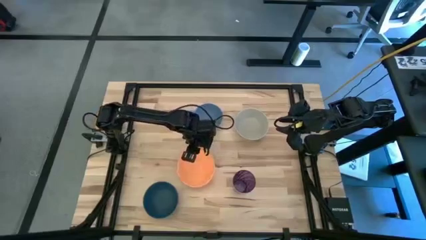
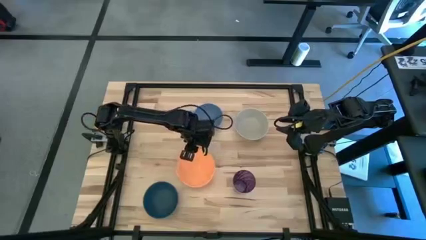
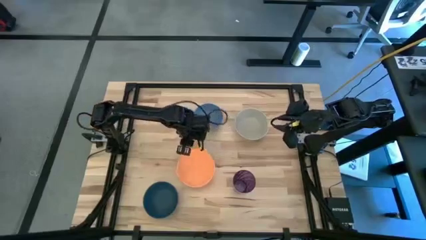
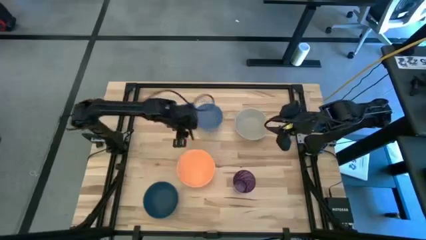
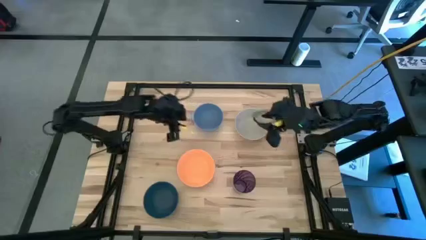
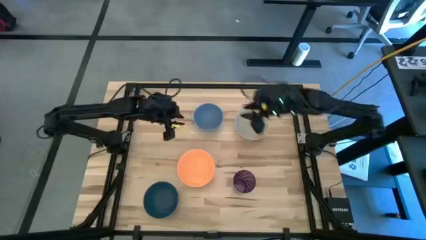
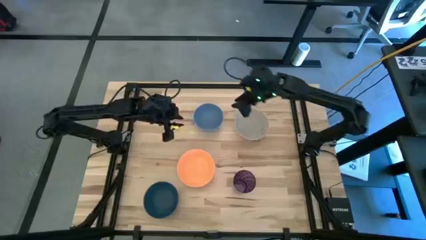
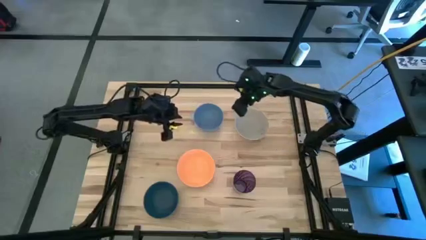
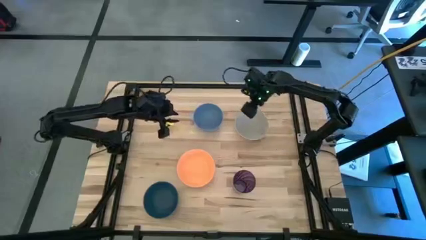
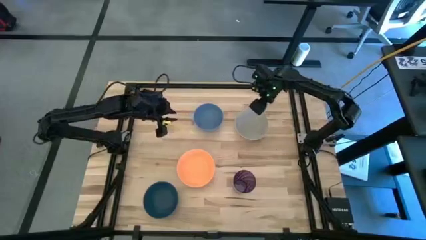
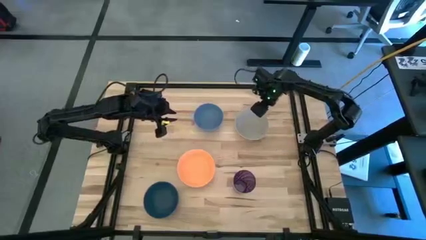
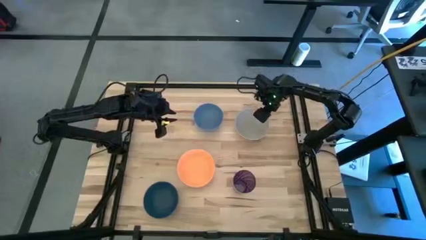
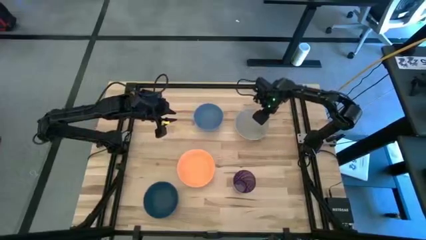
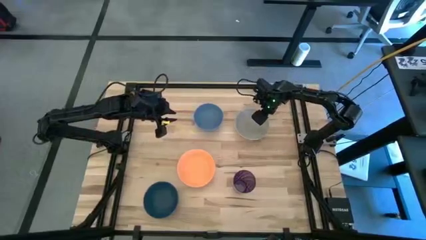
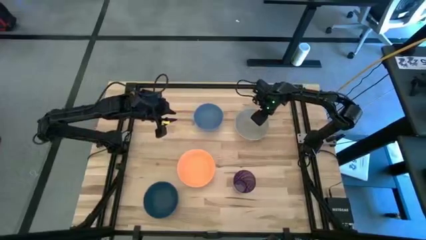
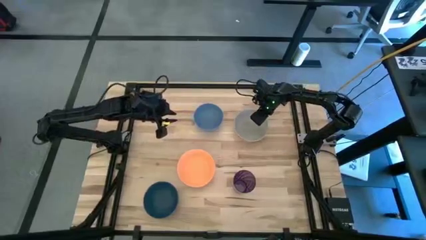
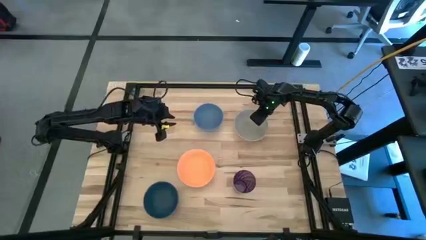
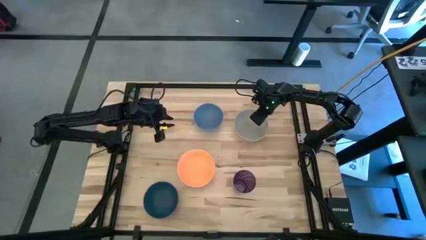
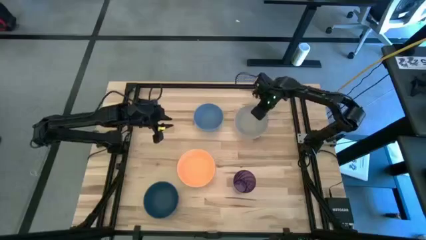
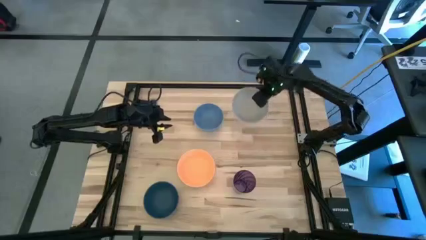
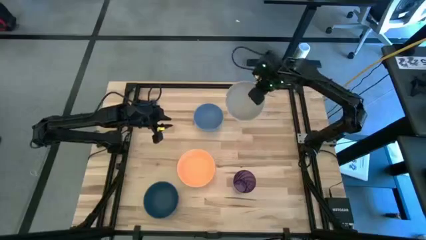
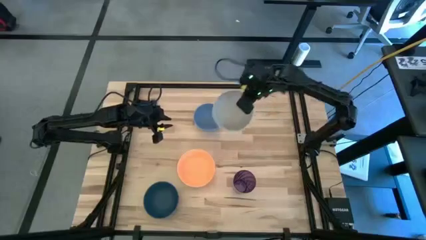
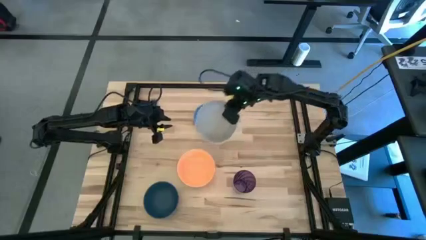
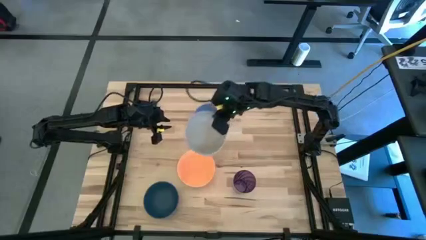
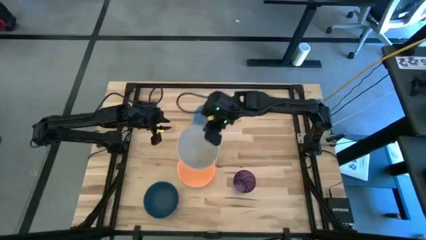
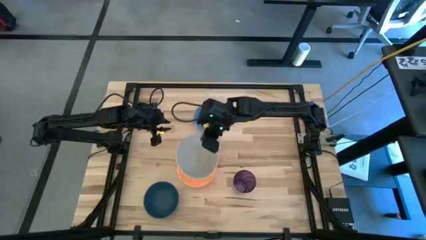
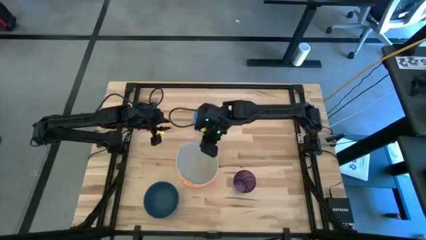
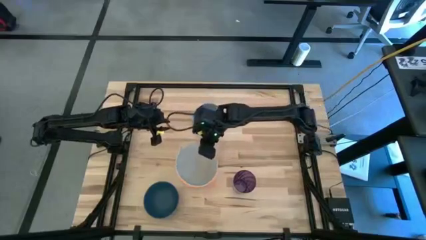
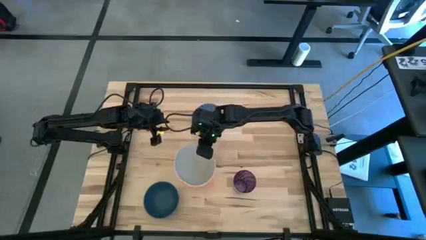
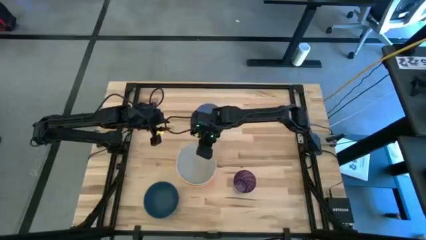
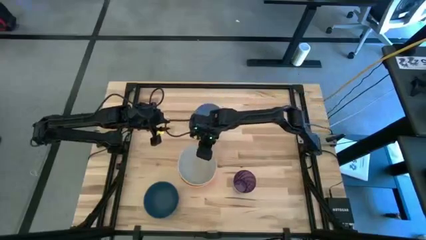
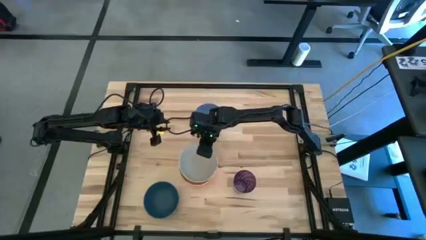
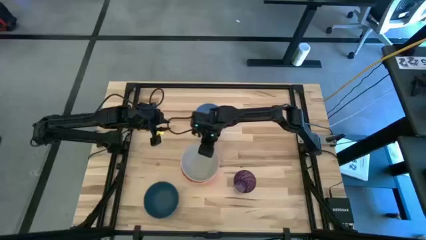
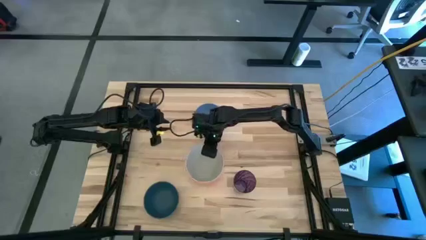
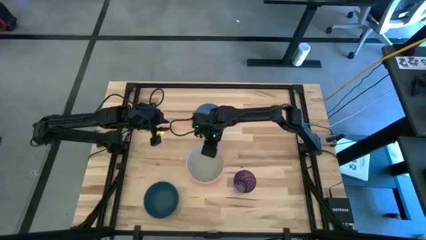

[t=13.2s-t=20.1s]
Stack the gray bowl on top of the orange bowl

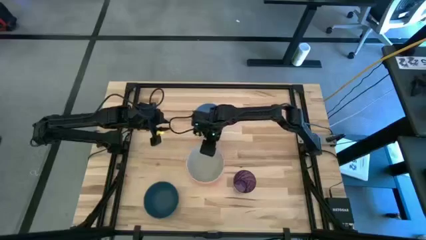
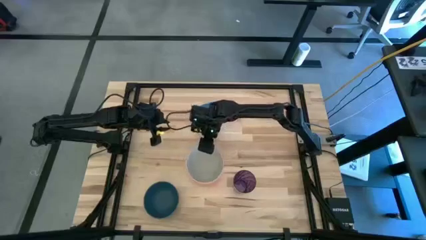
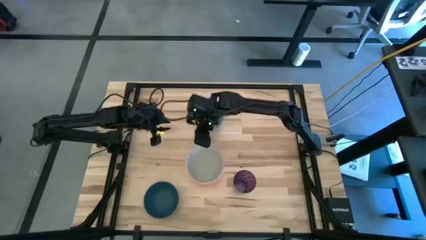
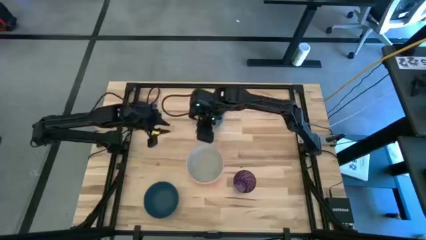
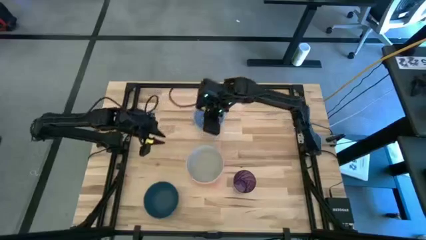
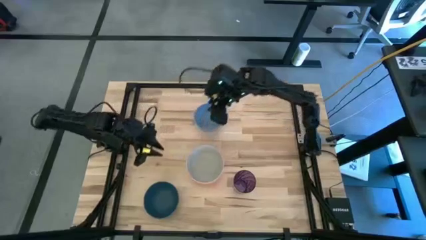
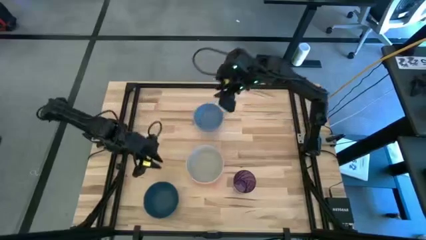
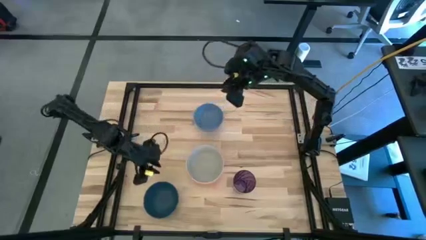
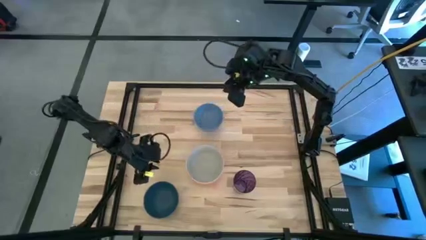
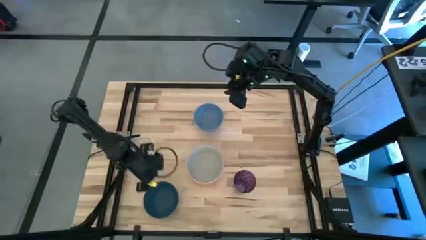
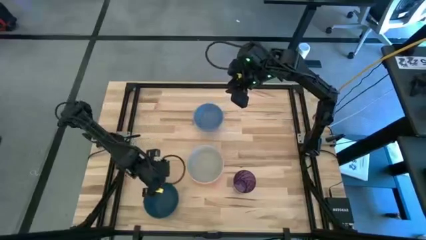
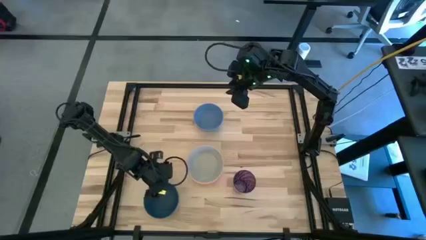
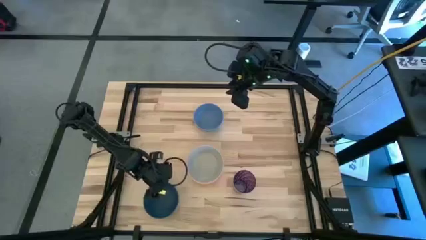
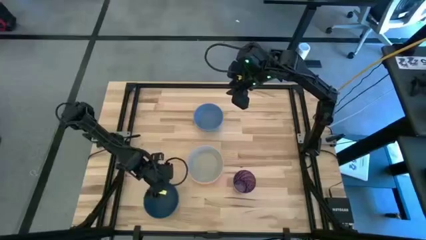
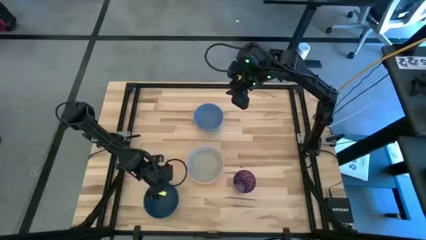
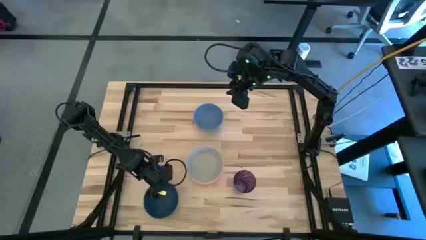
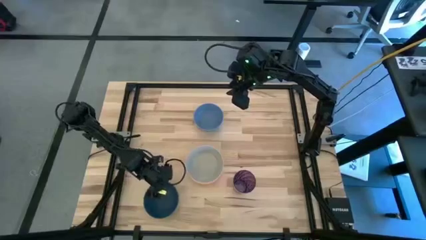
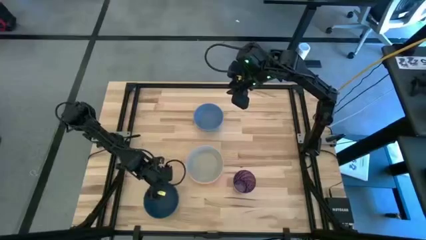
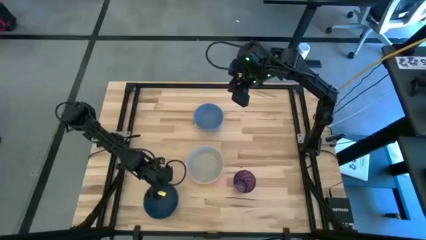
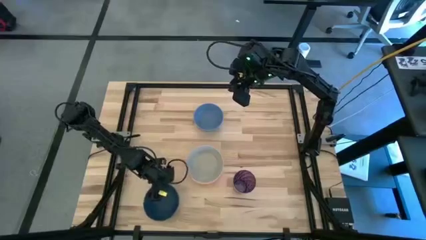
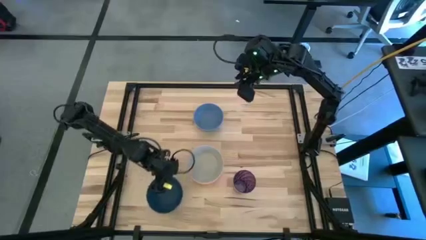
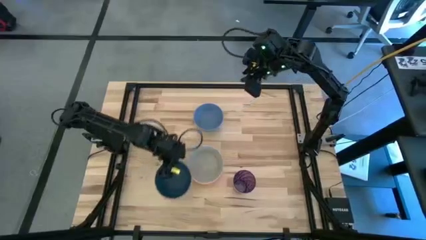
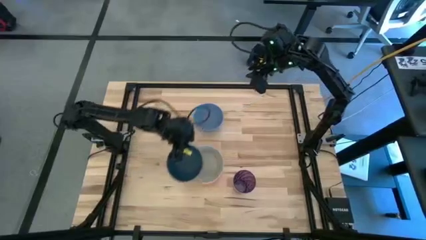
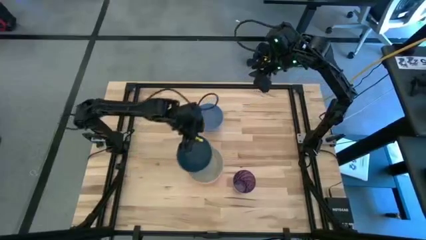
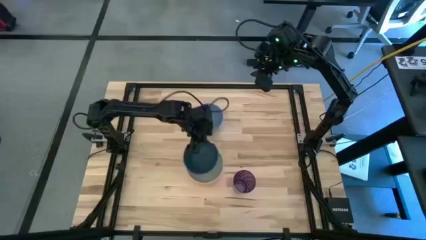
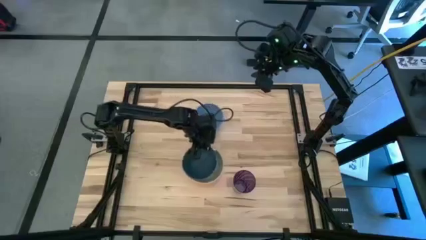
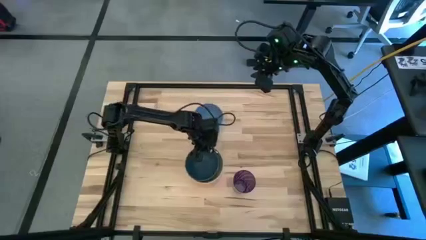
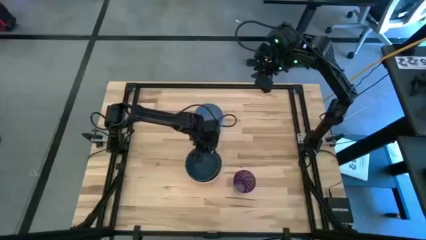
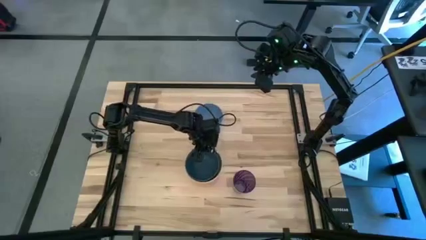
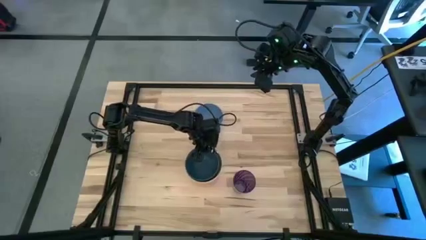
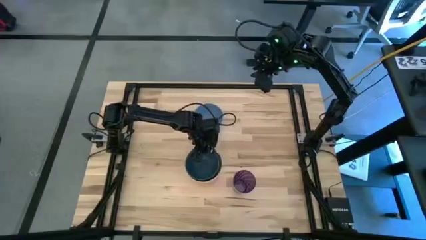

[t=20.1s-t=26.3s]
Stack the blue bowl on top of the gray bowl
